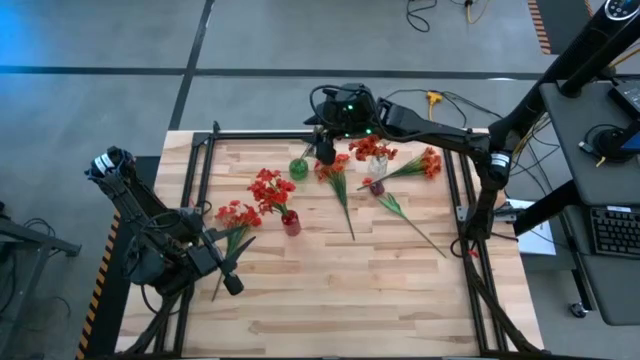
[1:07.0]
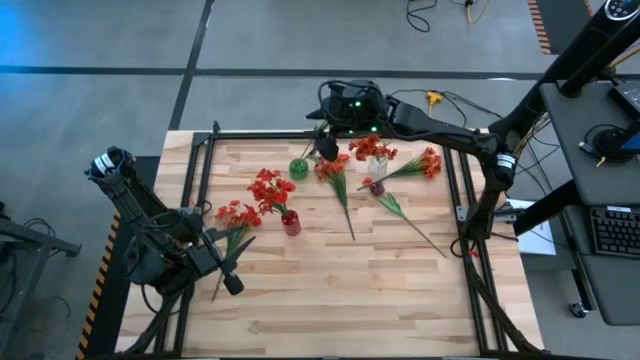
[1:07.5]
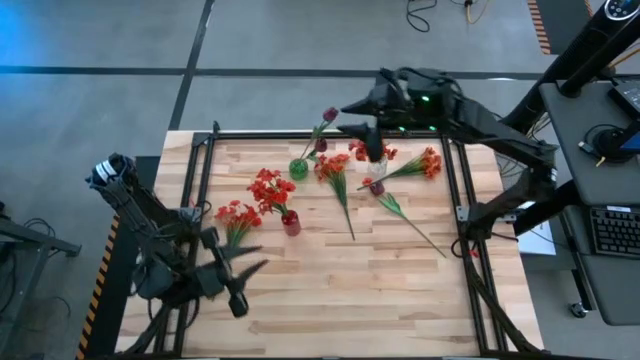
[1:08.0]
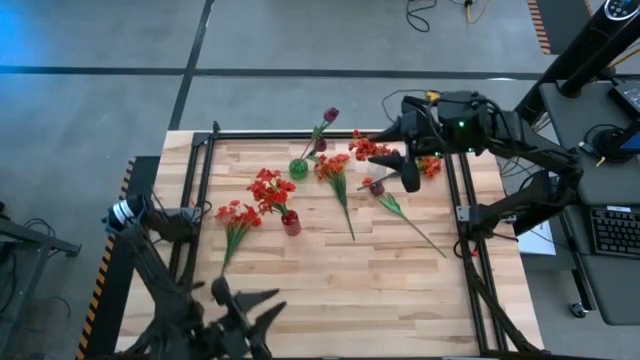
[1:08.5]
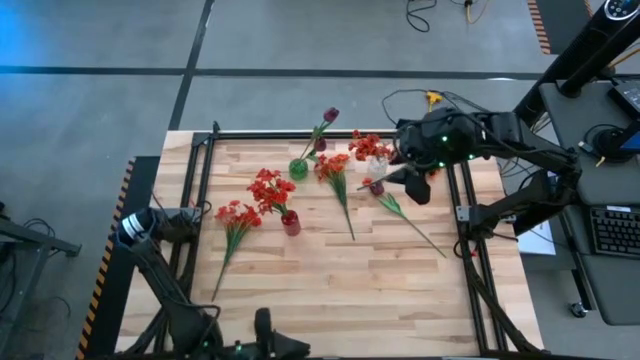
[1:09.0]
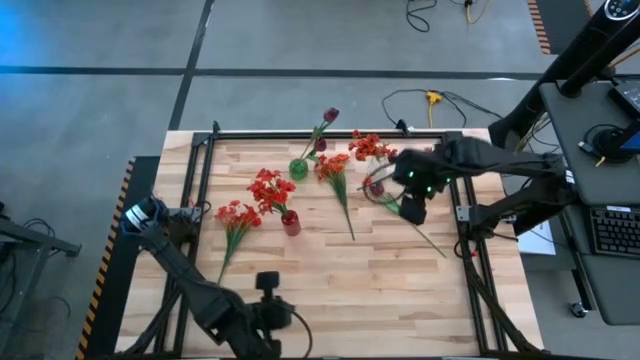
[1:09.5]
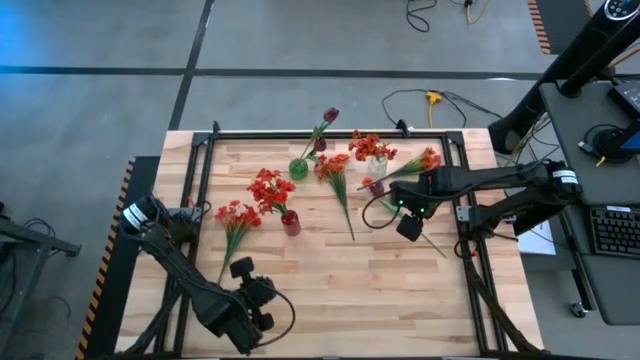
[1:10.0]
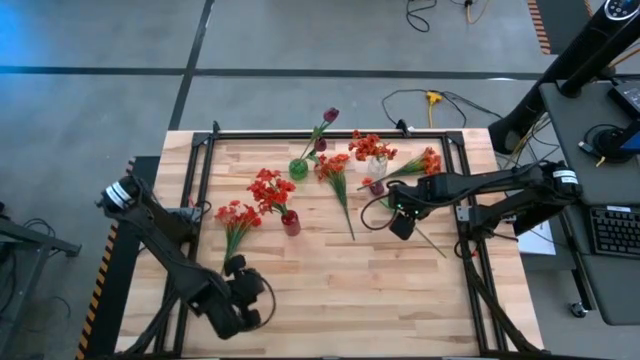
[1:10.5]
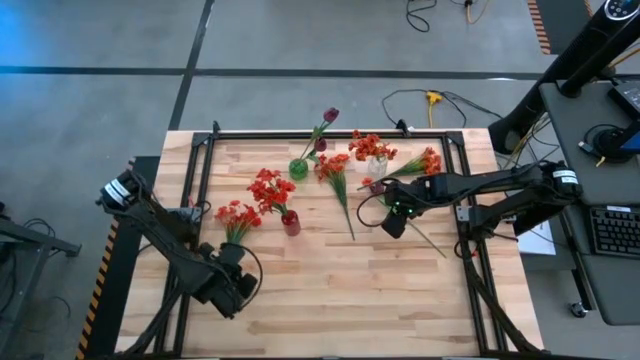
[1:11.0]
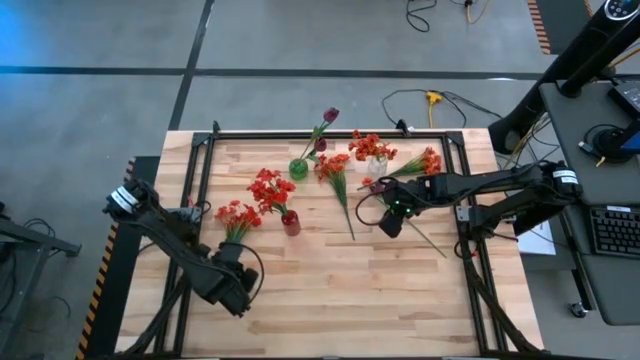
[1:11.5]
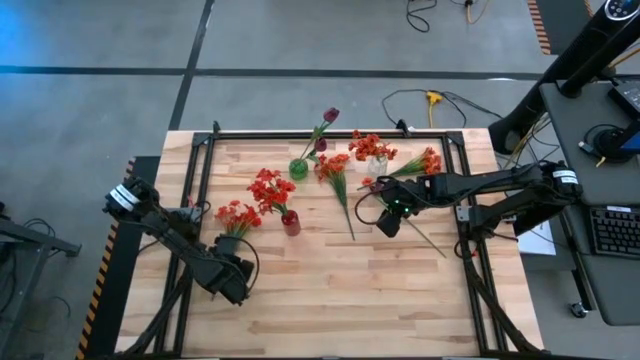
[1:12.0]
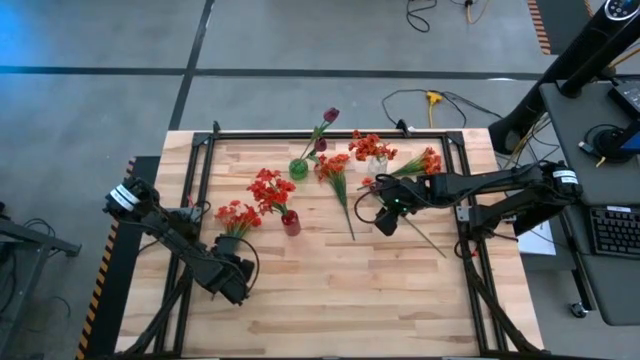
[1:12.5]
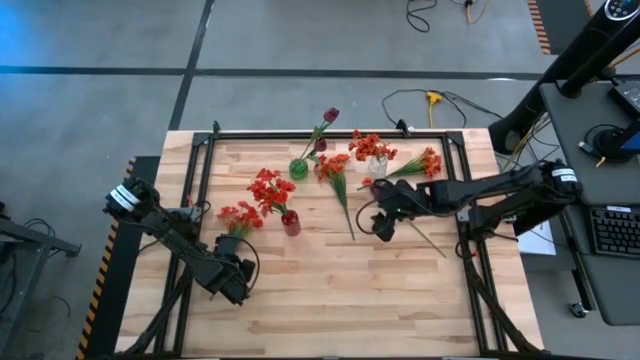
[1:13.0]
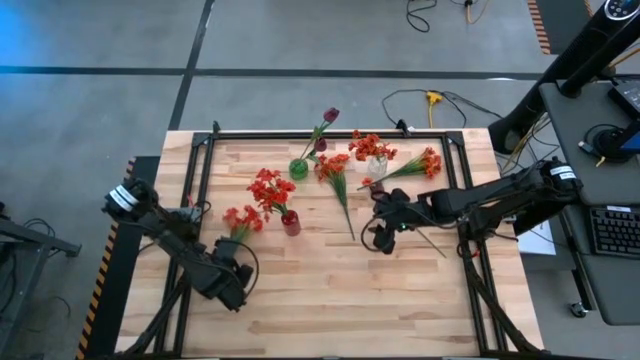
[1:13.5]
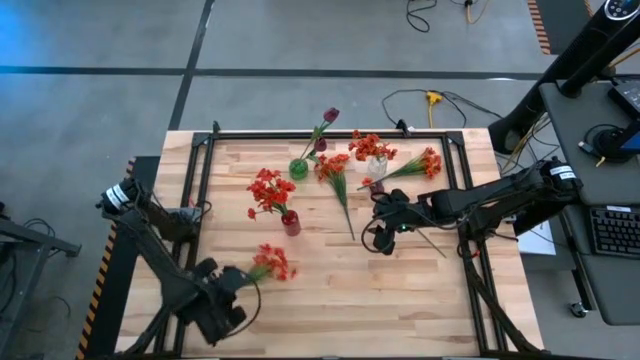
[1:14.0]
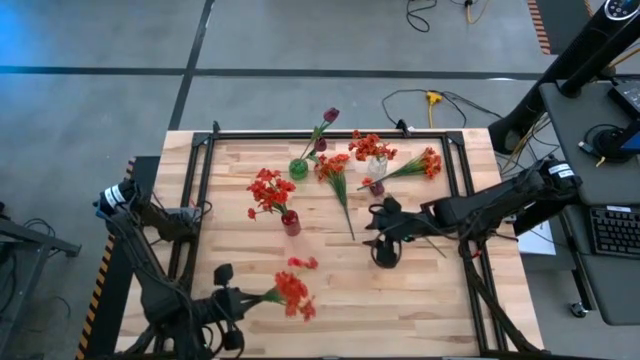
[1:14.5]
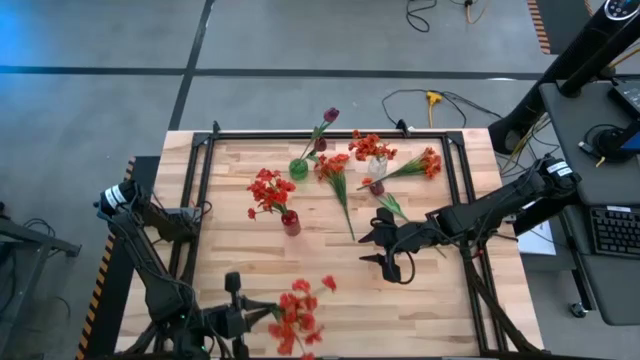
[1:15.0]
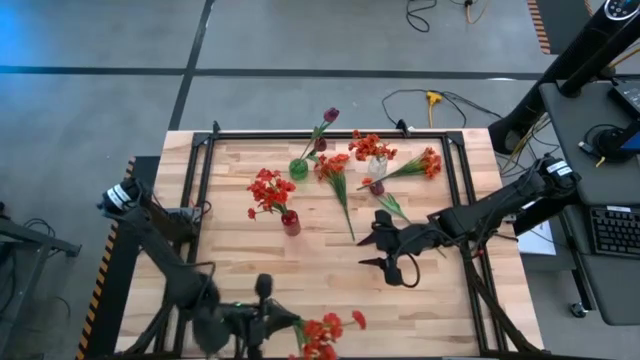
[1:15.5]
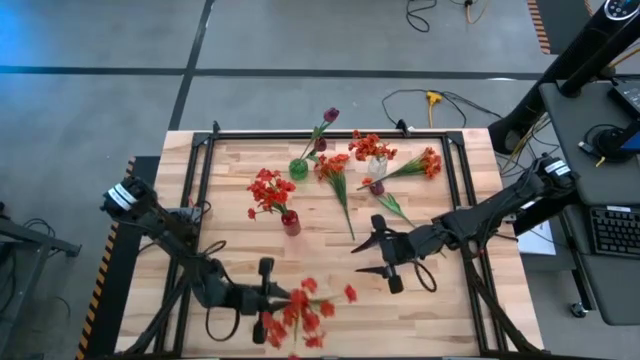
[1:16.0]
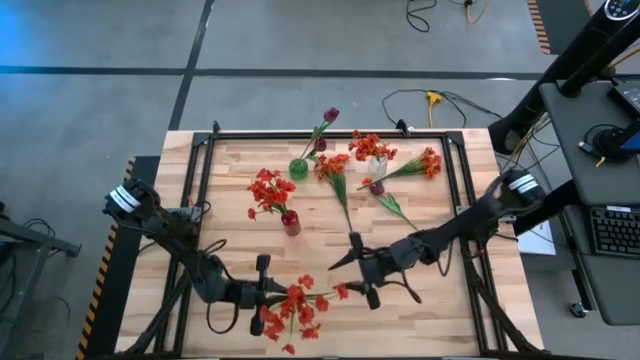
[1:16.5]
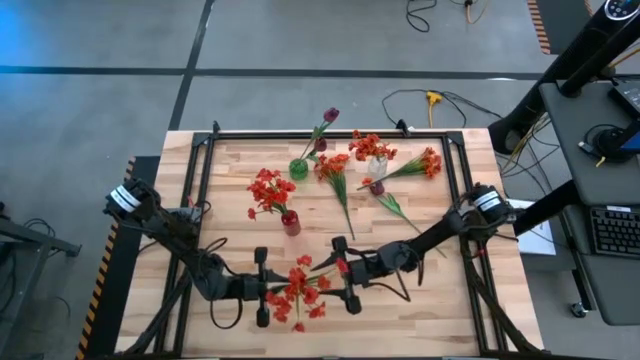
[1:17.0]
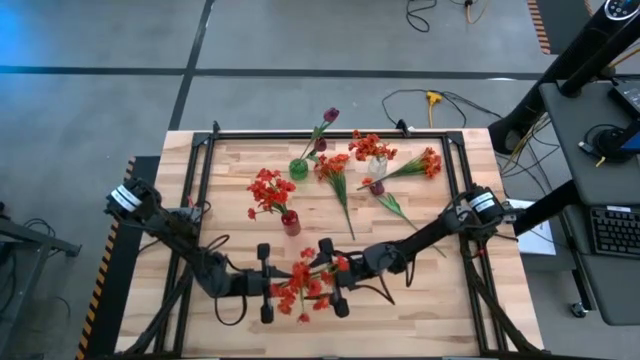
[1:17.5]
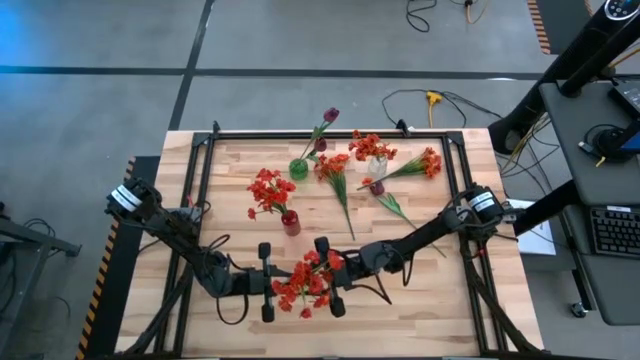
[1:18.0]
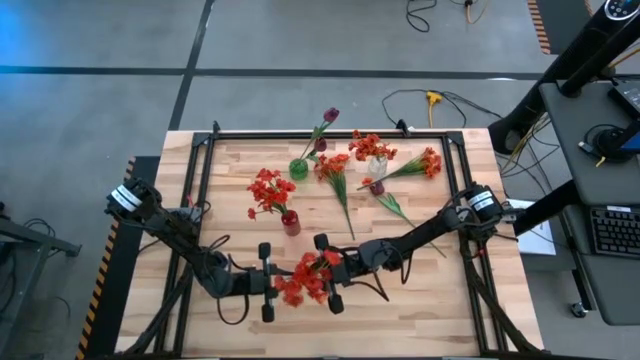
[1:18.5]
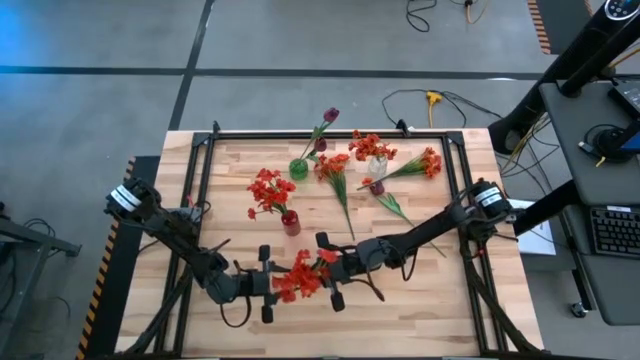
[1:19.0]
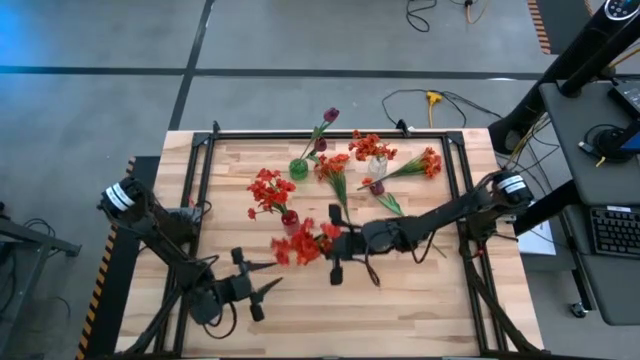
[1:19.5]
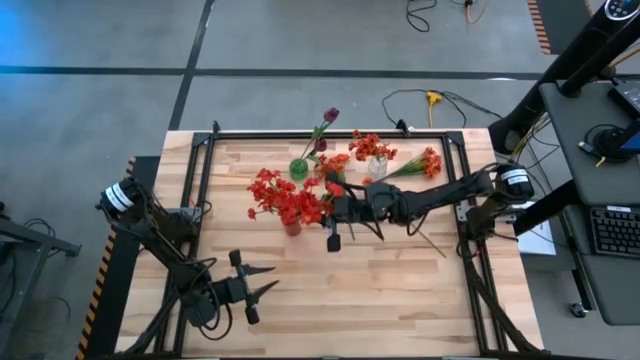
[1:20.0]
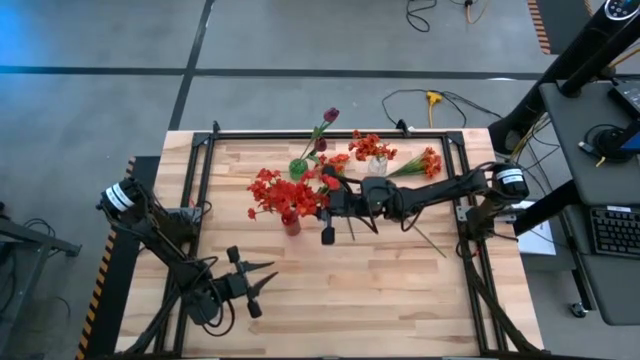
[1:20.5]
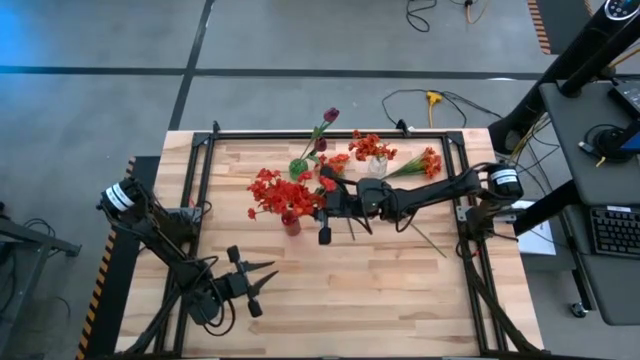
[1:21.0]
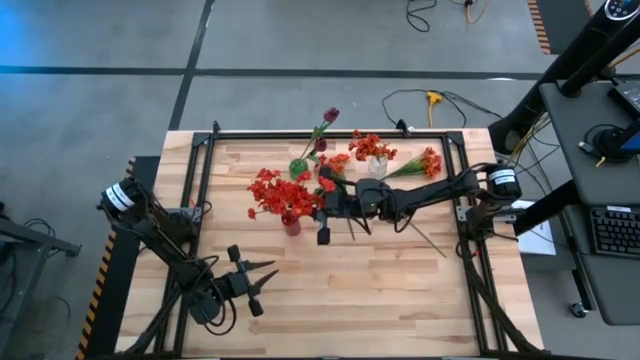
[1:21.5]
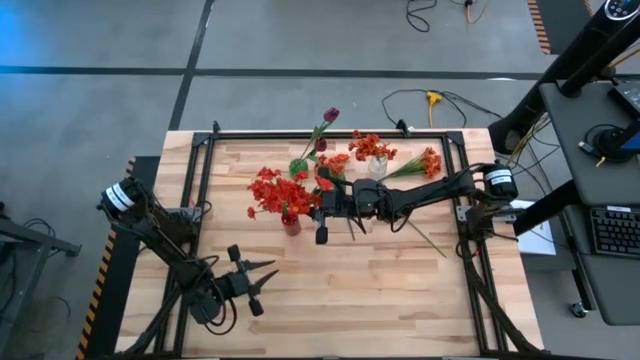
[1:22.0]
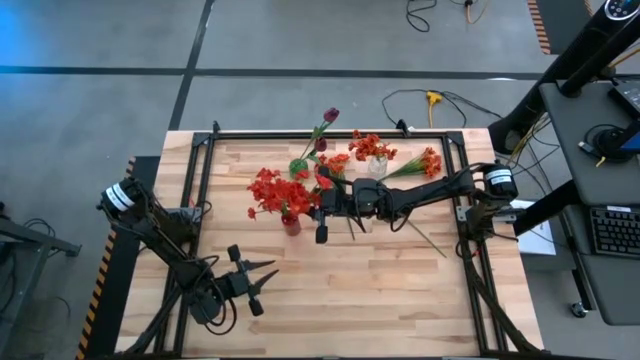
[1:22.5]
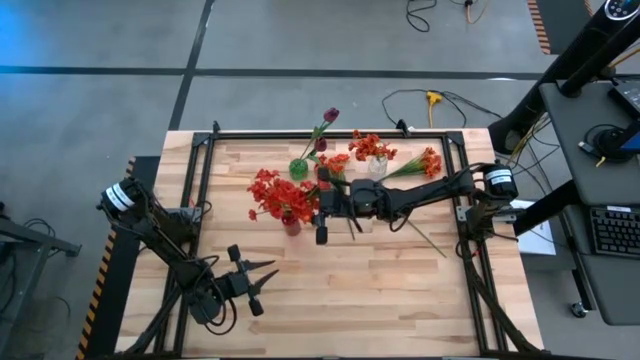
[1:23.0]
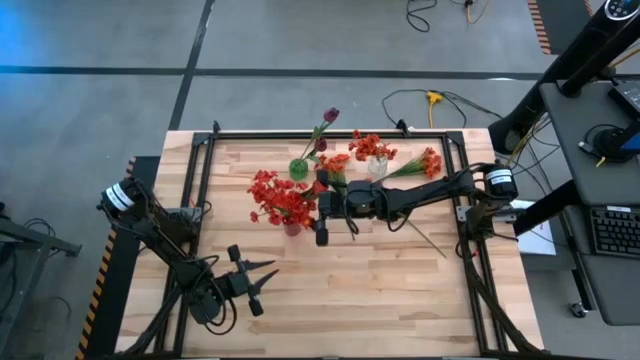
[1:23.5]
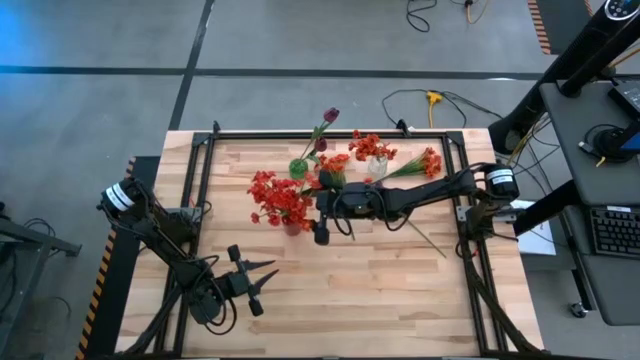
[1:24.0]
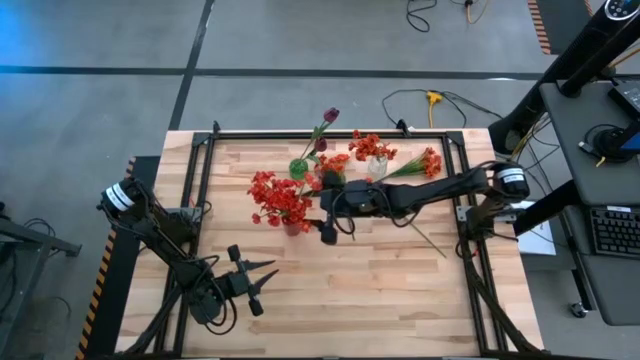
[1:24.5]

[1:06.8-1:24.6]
Task: Sort flowers into vase by color
Put the red flowers into the red vase

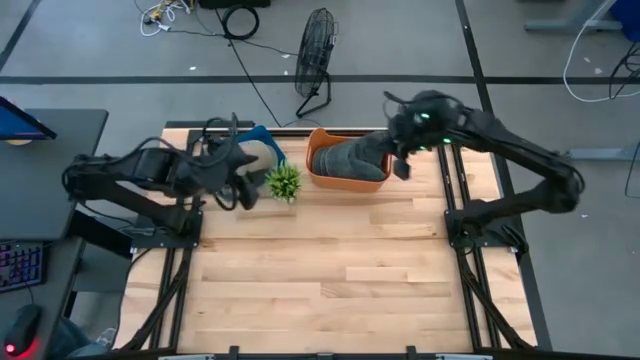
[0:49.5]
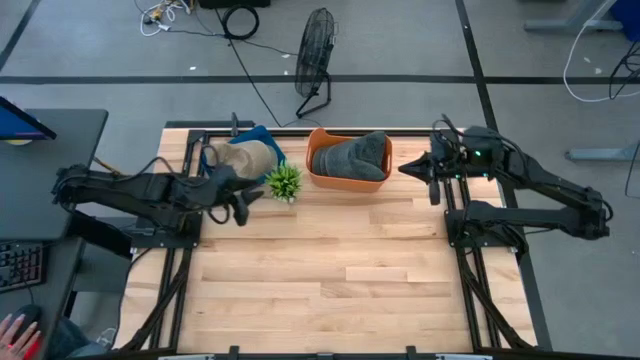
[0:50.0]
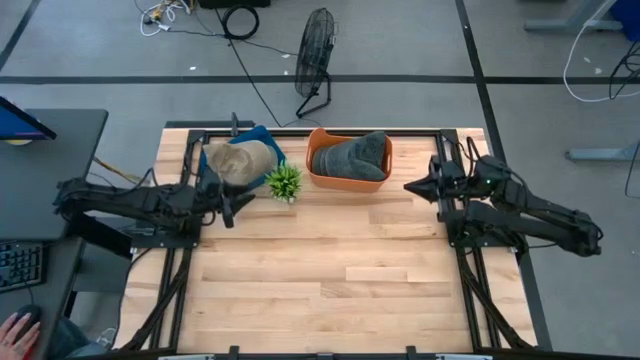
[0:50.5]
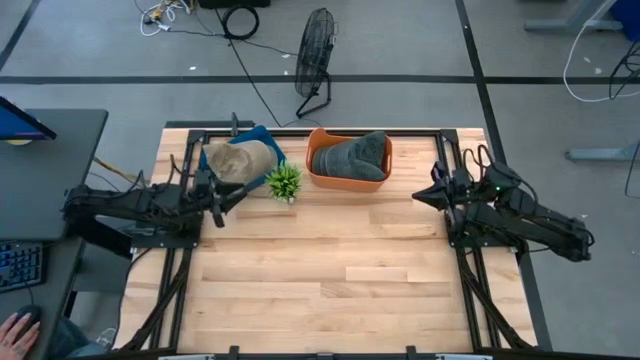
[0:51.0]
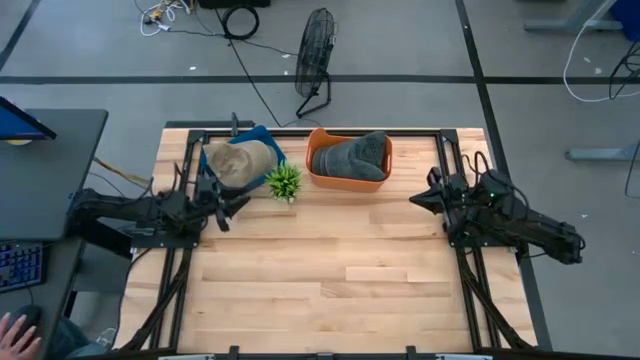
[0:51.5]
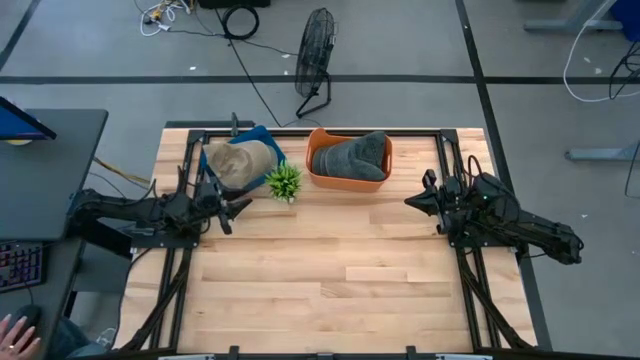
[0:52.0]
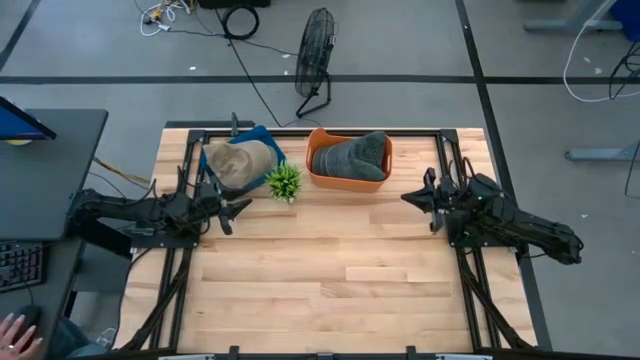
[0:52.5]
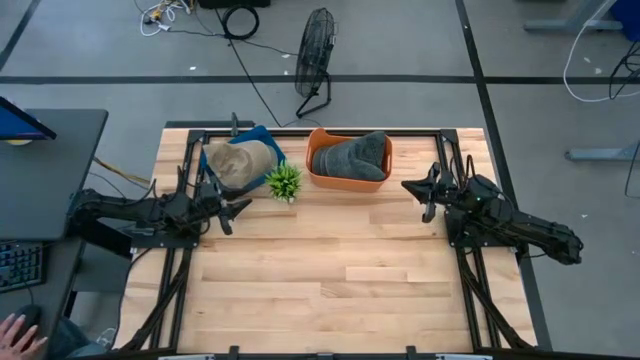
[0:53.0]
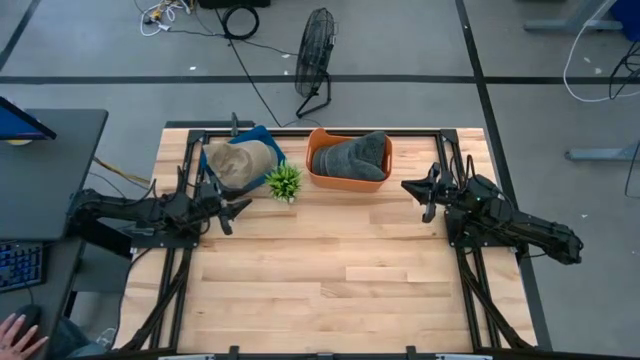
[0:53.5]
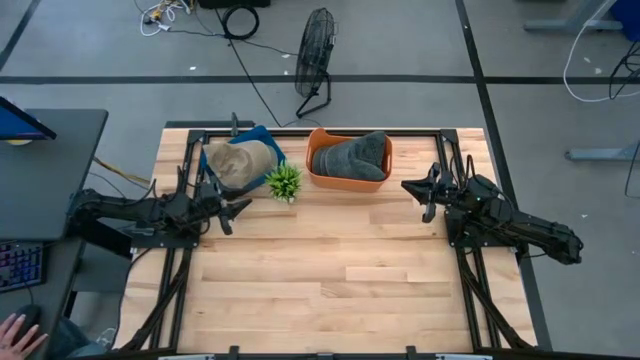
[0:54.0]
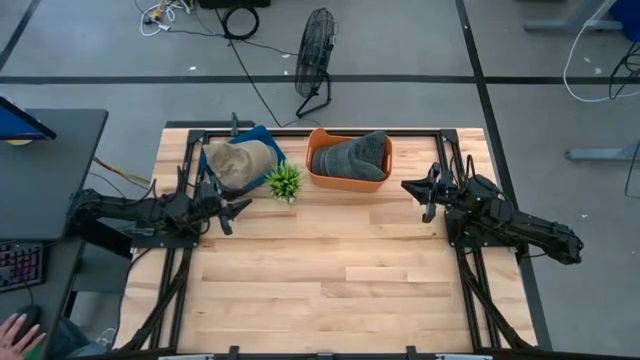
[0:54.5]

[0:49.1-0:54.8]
Task: Pick & Place hat
Return to Home Position
